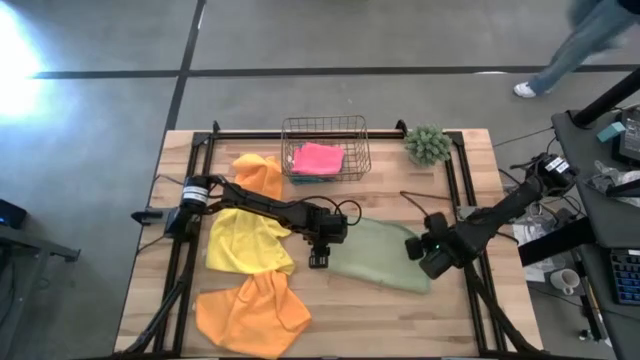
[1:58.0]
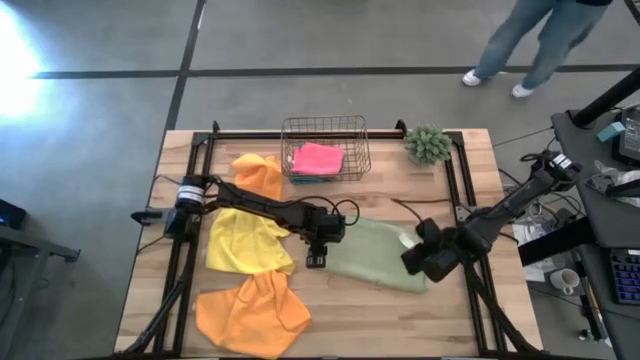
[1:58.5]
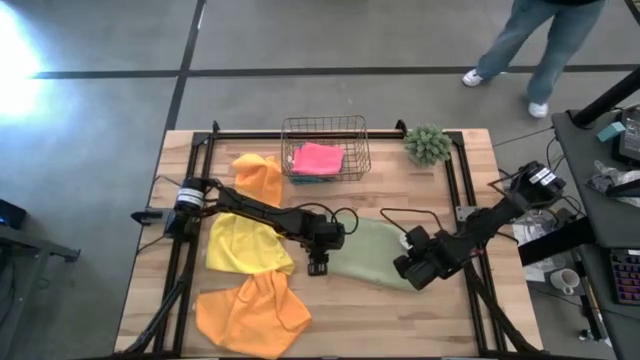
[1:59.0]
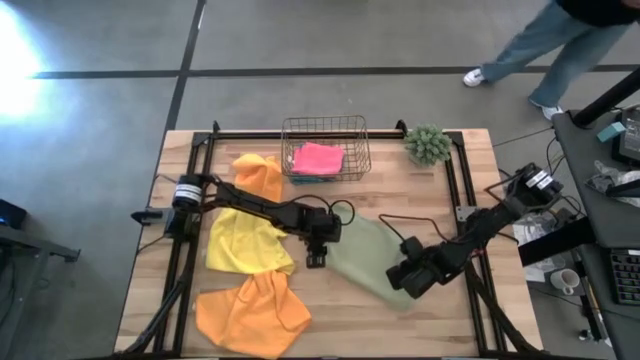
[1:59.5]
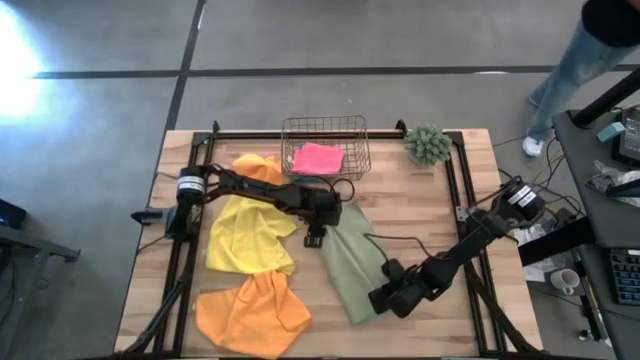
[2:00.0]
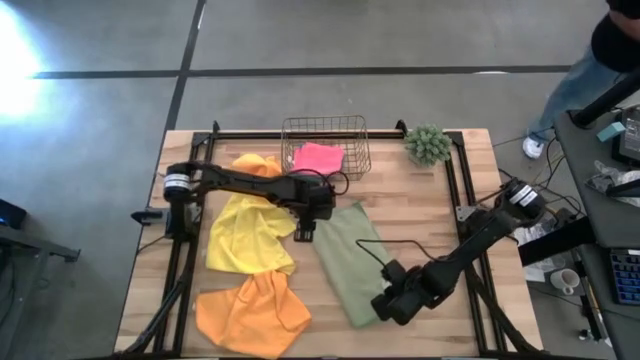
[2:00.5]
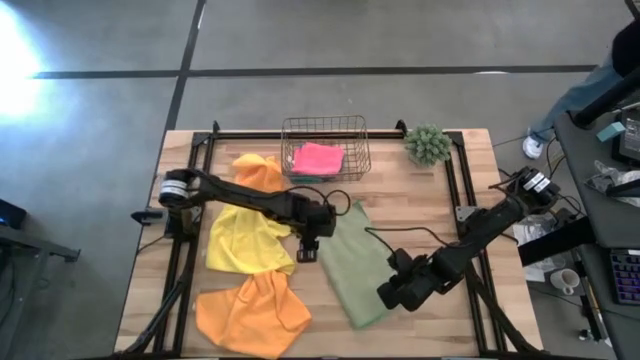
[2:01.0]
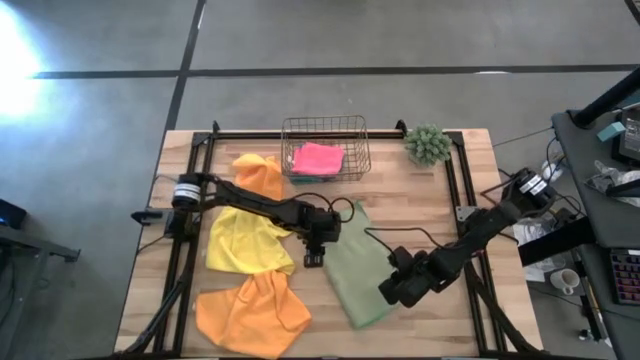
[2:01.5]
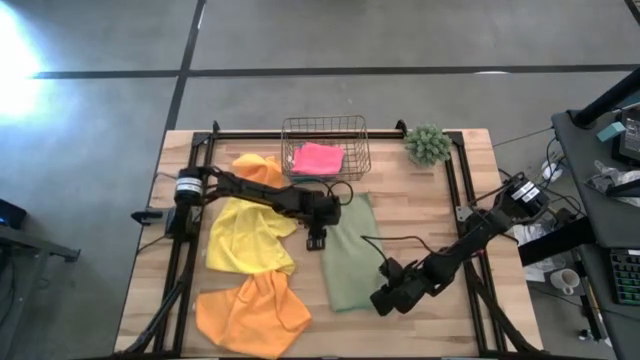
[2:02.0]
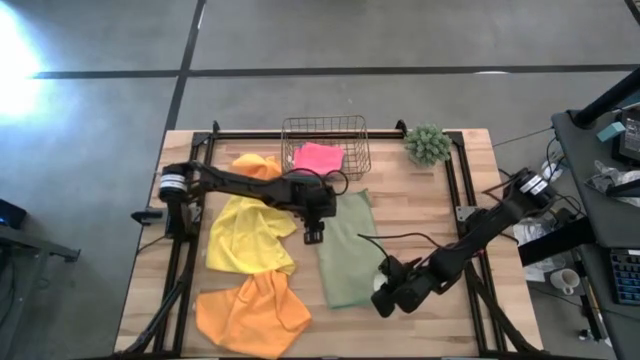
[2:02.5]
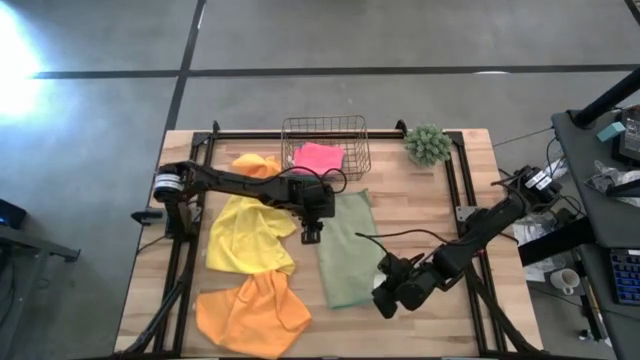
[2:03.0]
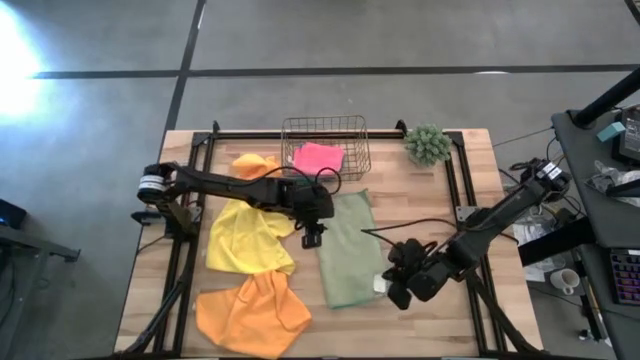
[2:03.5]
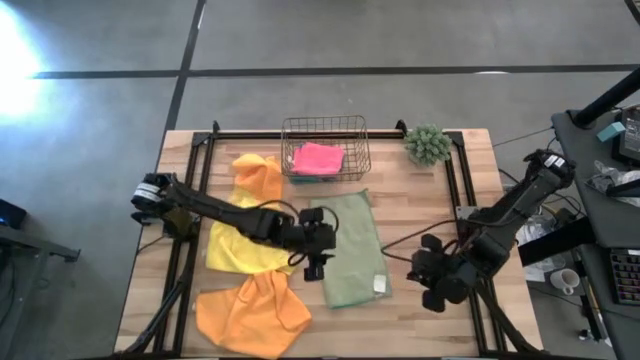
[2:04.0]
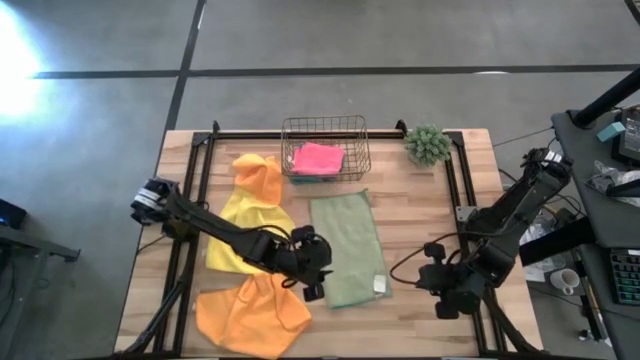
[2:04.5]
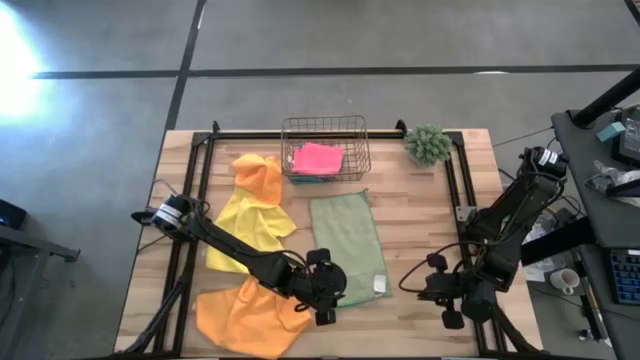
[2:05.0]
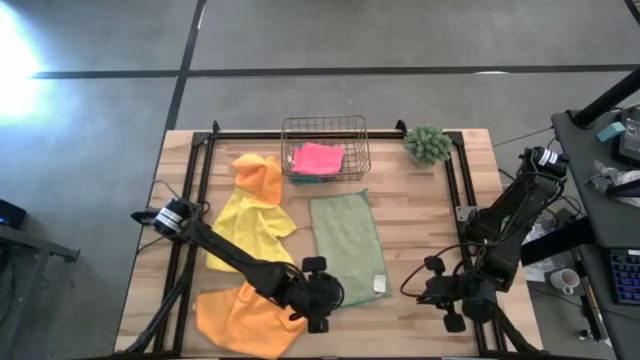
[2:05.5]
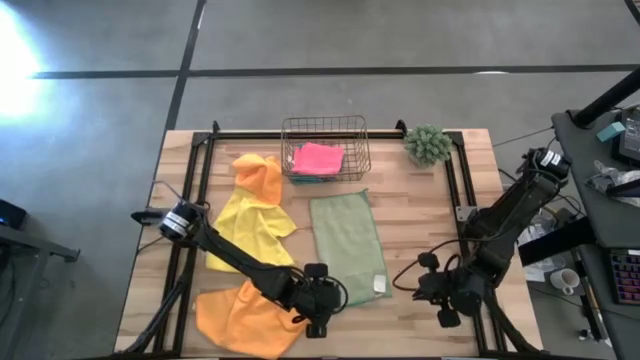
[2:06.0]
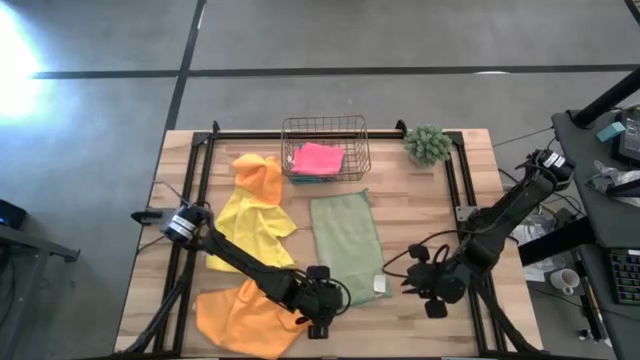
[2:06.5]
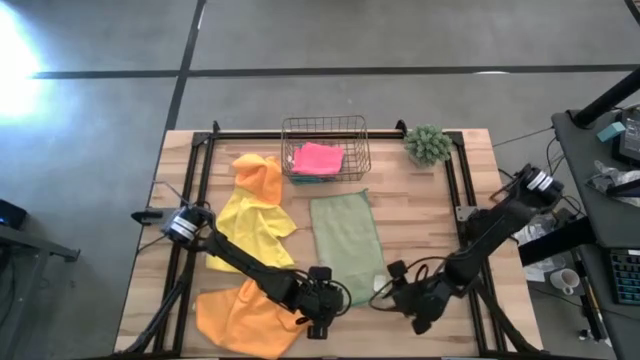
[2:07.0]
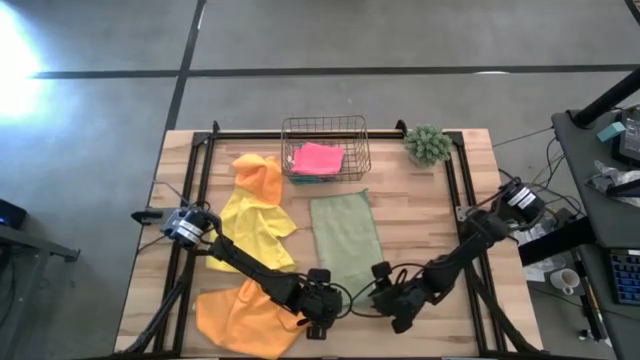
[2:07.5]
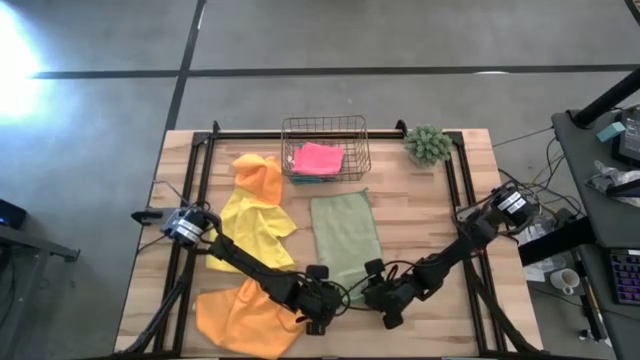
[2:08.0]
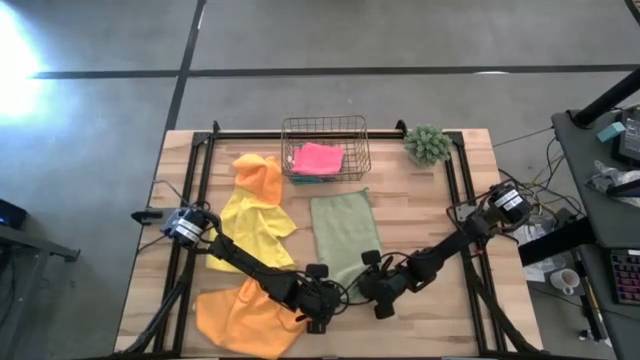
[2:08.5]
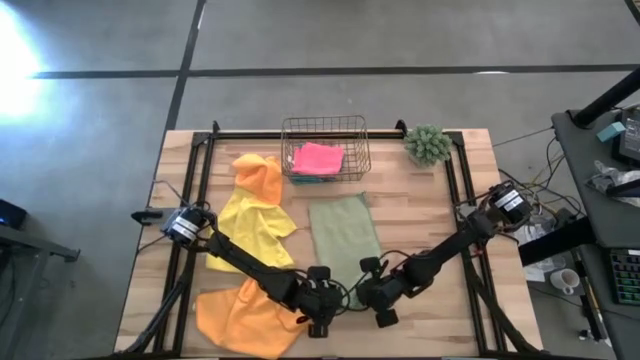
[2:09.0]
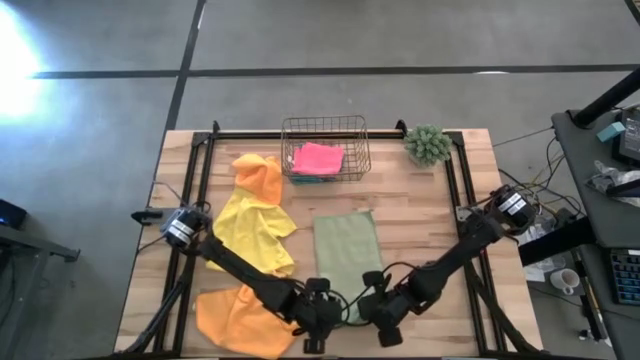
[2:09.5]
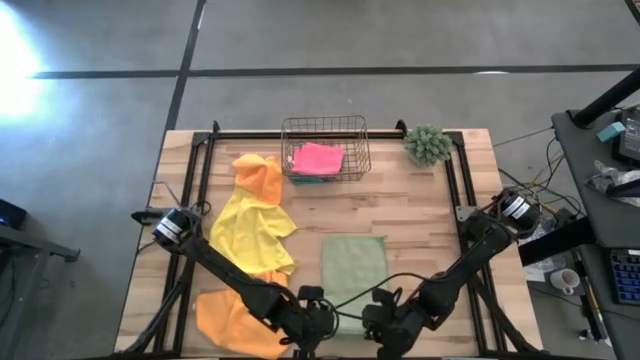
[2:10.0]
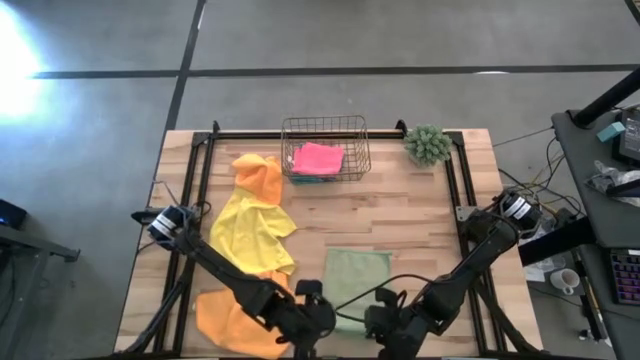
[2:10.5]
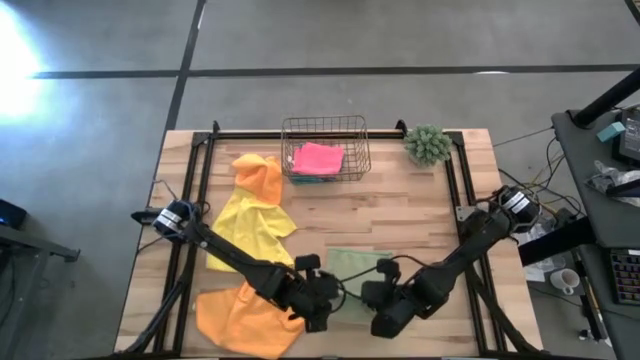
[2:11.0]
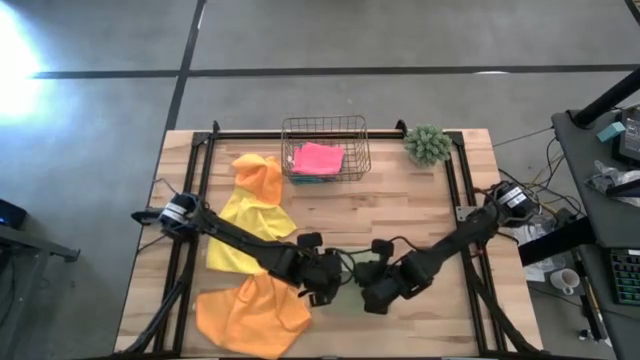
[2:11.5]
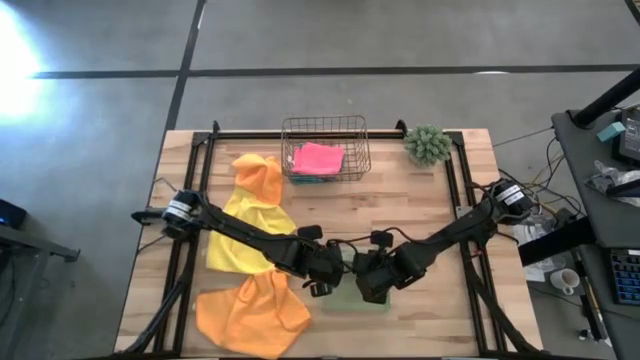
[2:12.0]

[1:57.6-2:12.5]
Task: Fold microfiber towels
Fold the green microfiber cloth

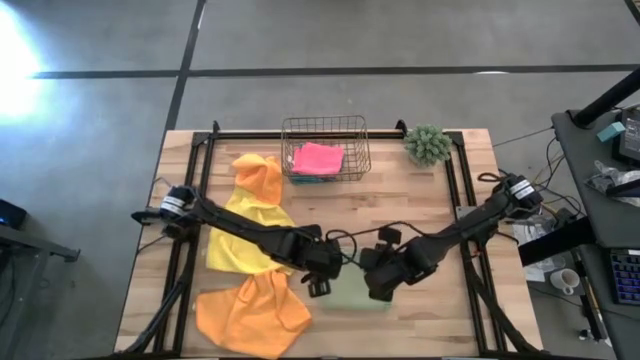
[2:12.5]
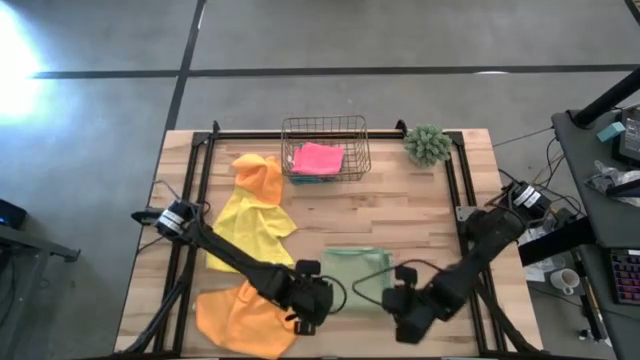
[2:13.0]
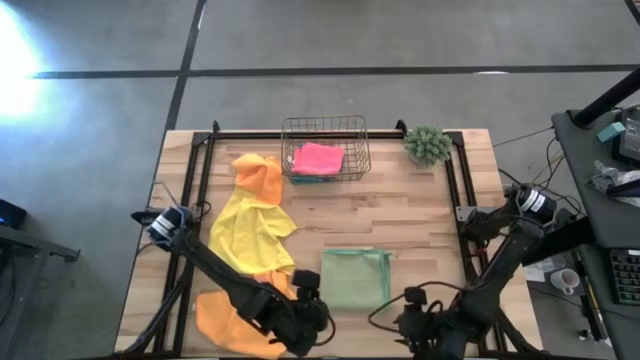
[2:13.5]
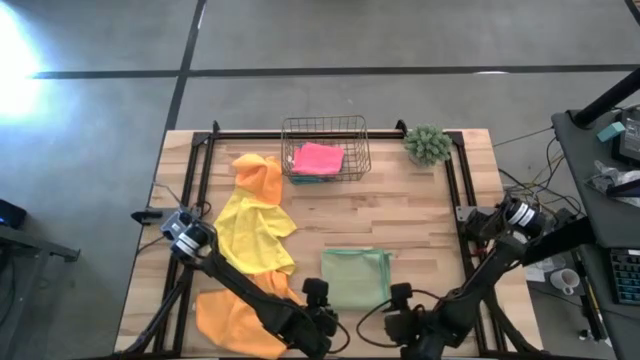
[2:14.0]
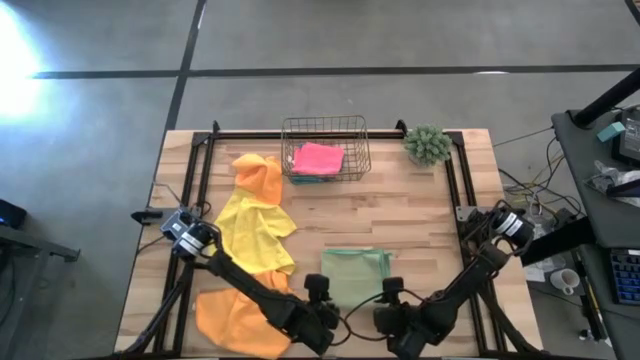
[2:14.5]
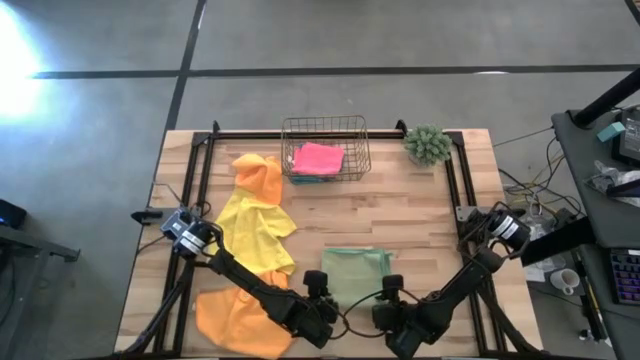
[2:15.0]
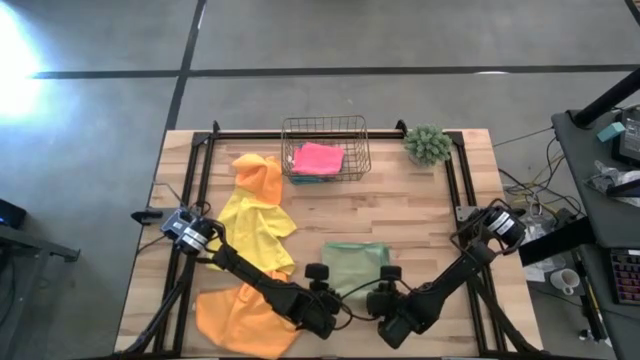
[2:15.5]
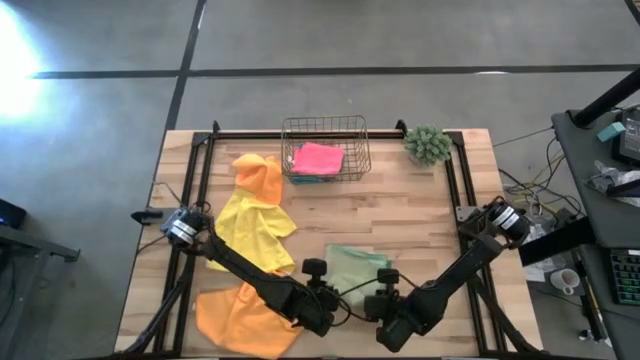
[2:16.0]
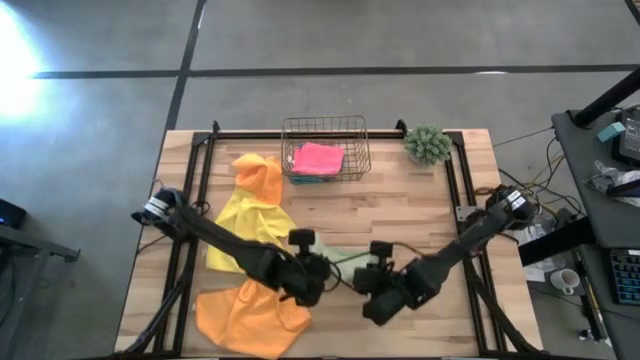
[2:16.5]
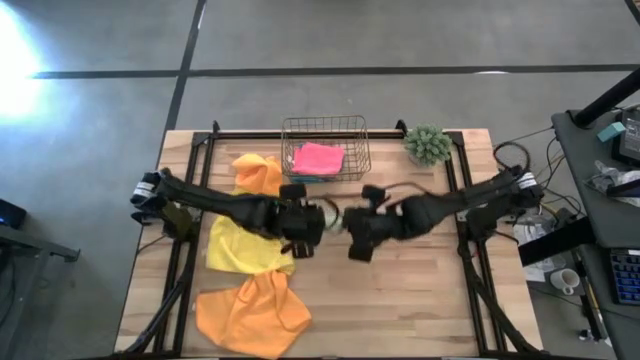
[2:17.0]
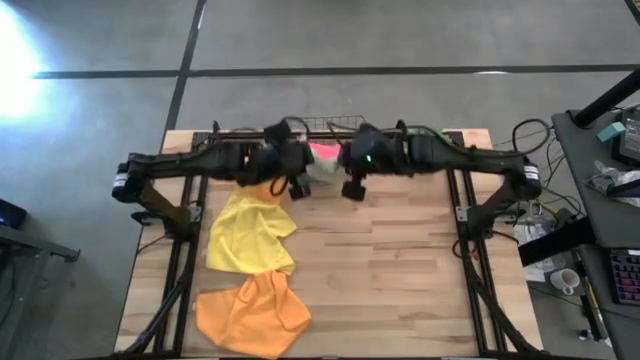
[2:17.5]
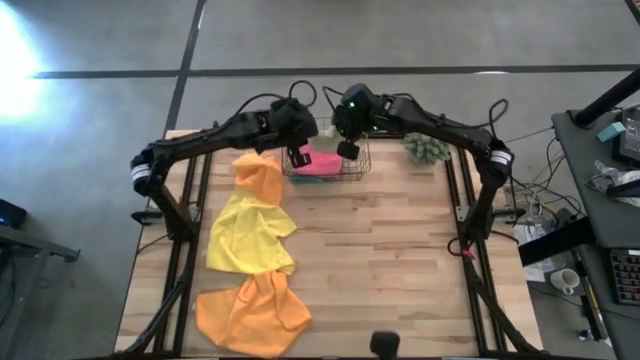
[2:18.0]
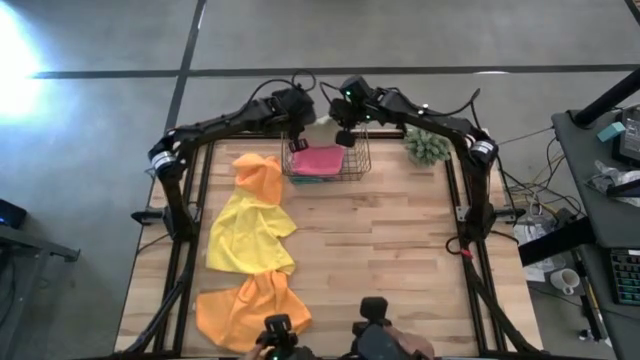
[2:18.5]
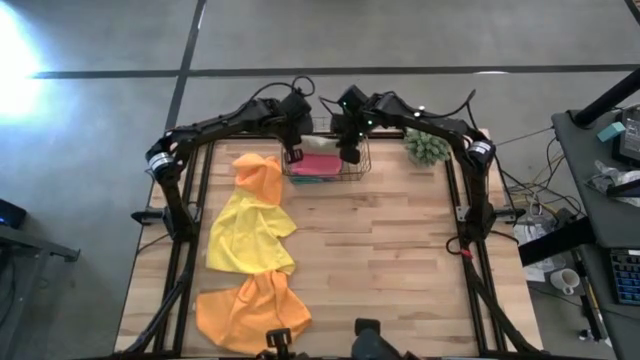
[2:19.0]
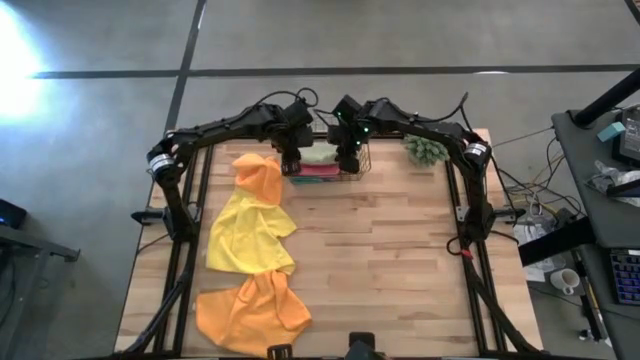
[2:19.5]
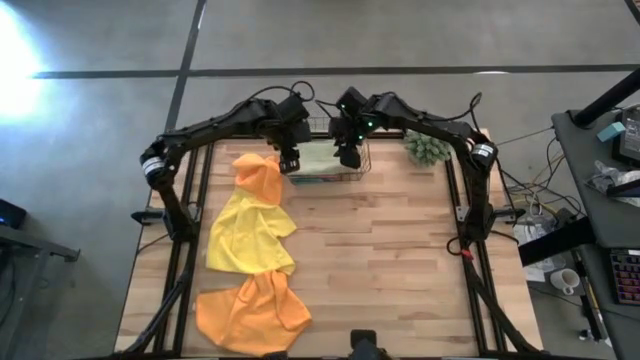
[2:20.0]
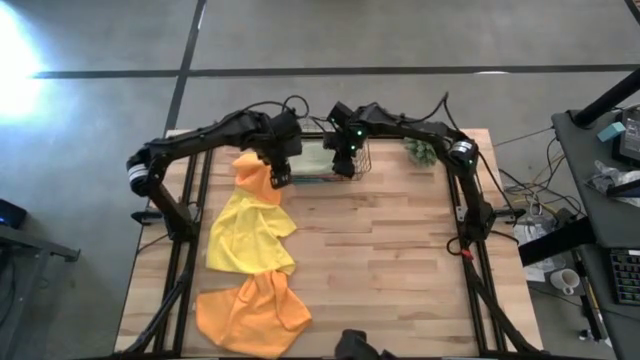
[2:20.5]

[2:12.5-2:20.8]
Put the green microfiber cloth into the wire basket
